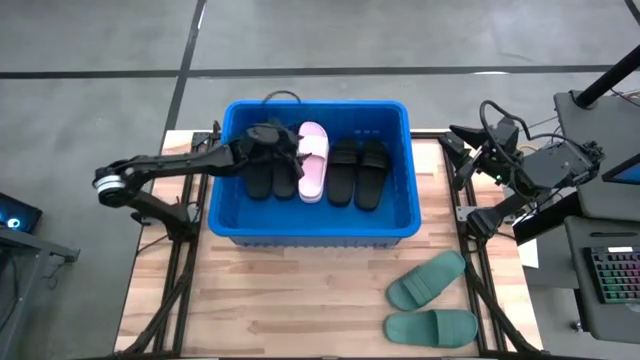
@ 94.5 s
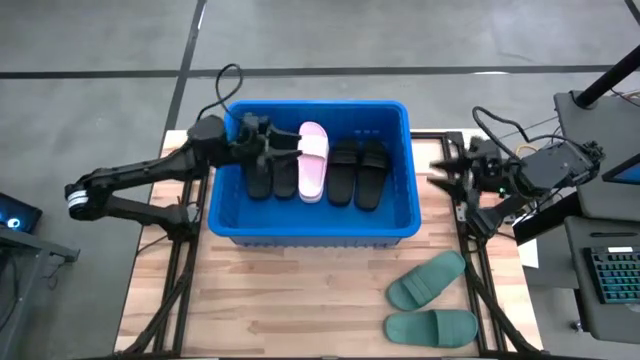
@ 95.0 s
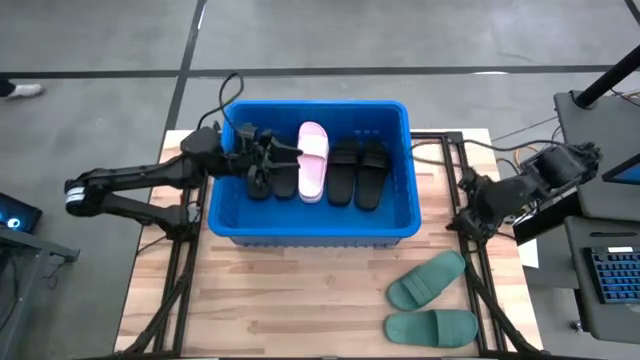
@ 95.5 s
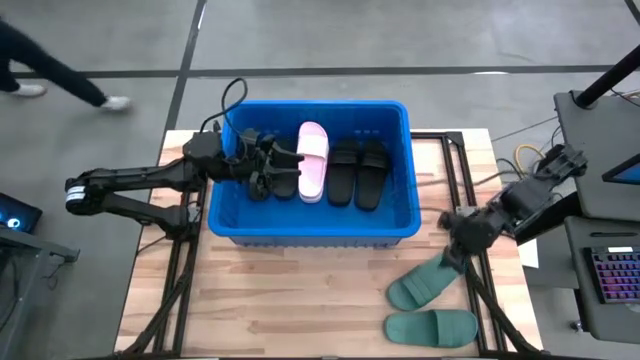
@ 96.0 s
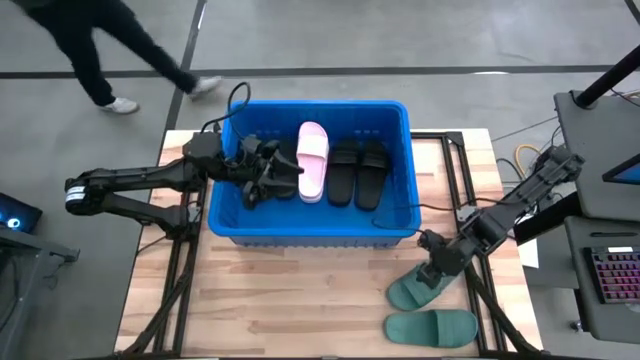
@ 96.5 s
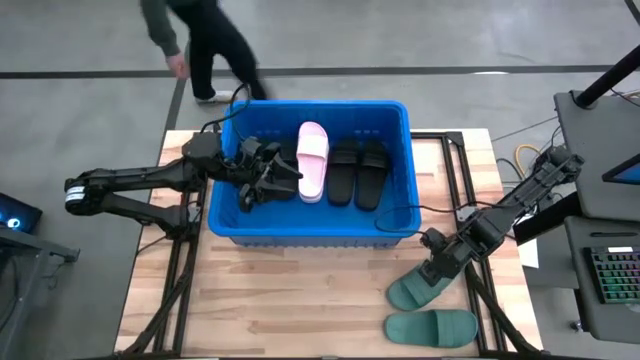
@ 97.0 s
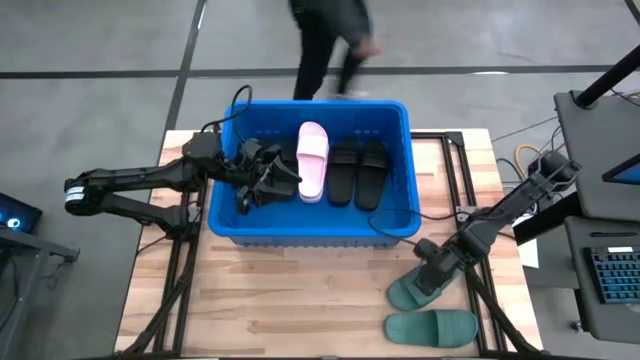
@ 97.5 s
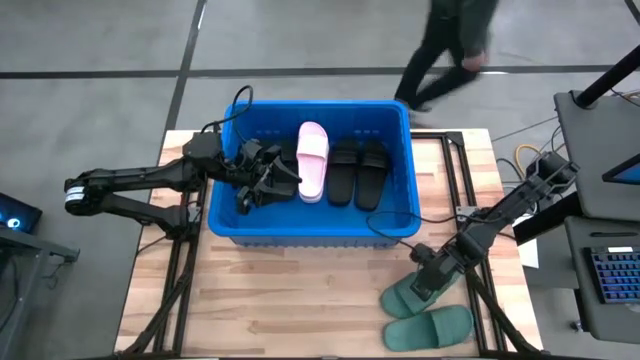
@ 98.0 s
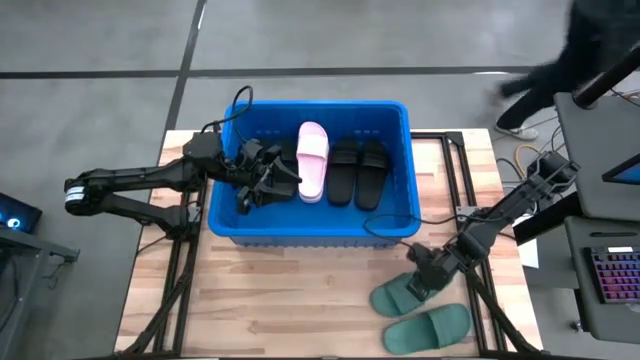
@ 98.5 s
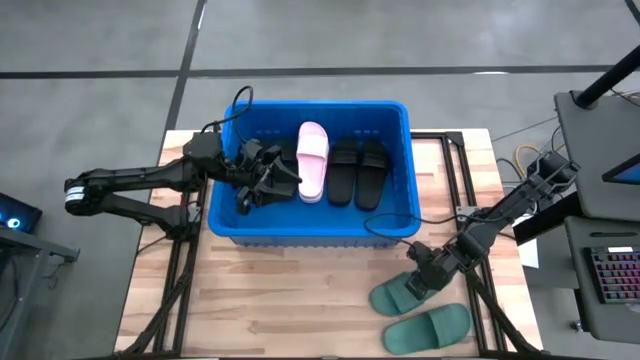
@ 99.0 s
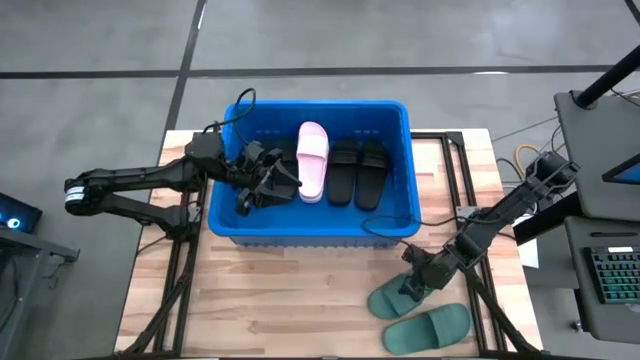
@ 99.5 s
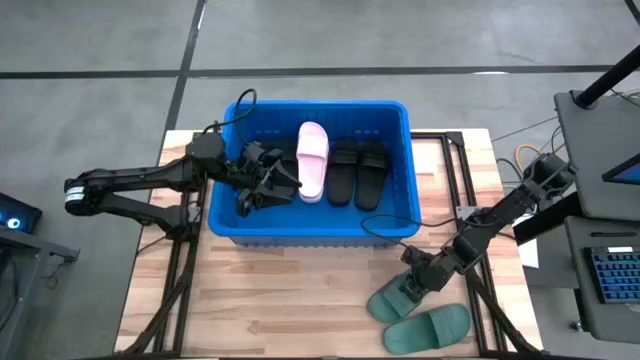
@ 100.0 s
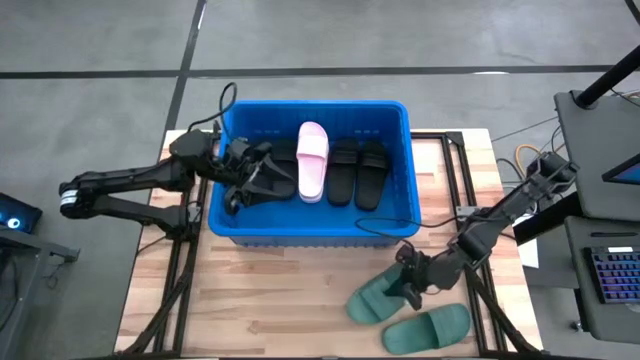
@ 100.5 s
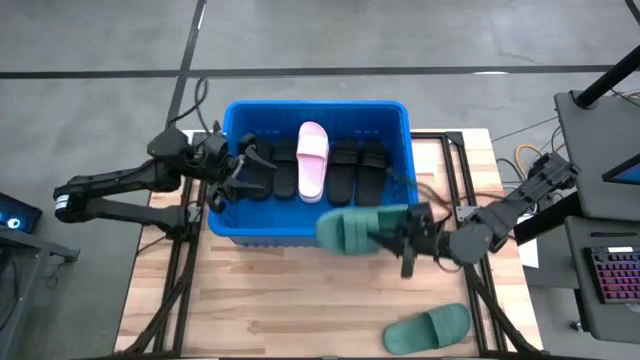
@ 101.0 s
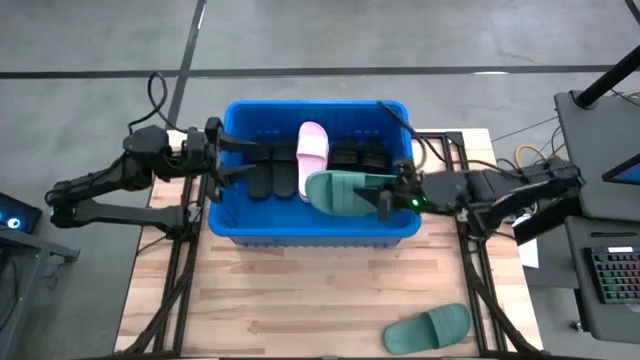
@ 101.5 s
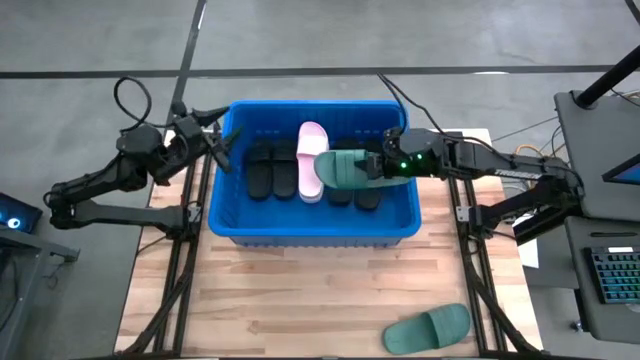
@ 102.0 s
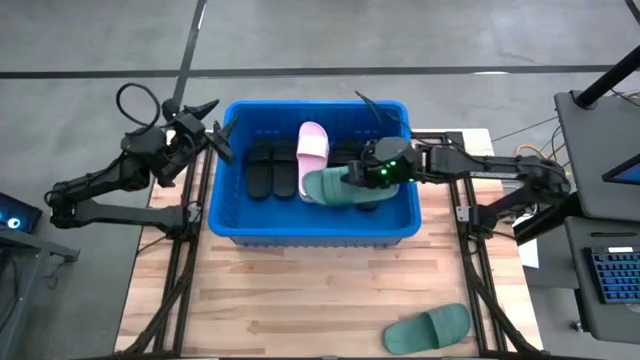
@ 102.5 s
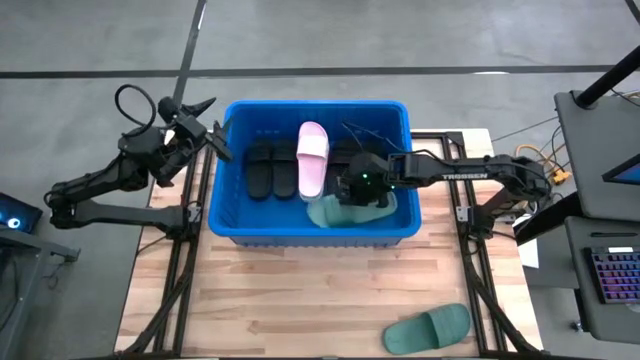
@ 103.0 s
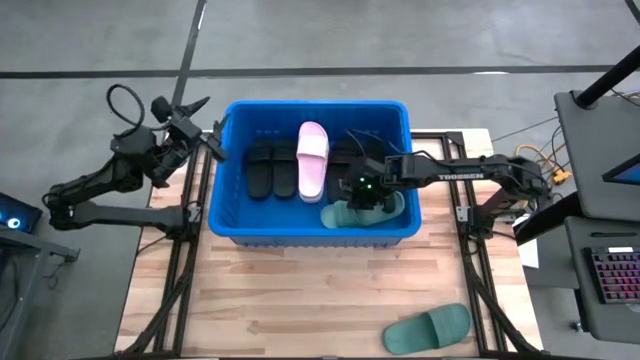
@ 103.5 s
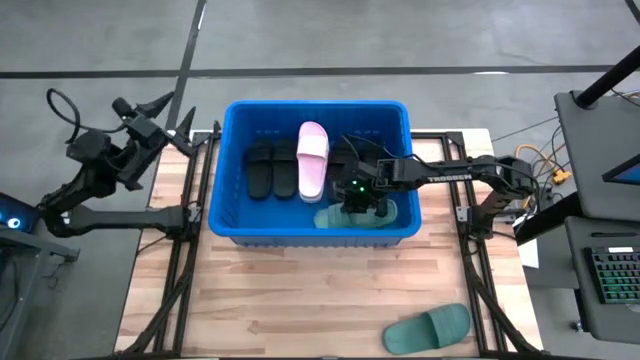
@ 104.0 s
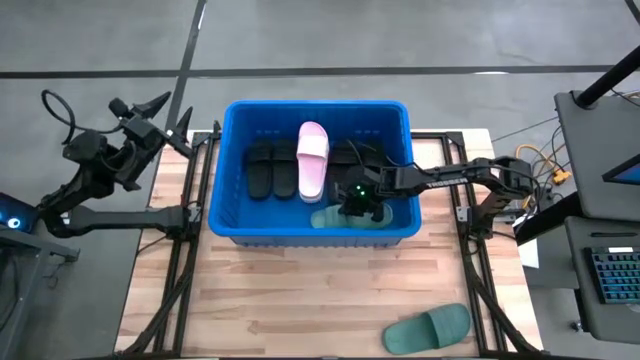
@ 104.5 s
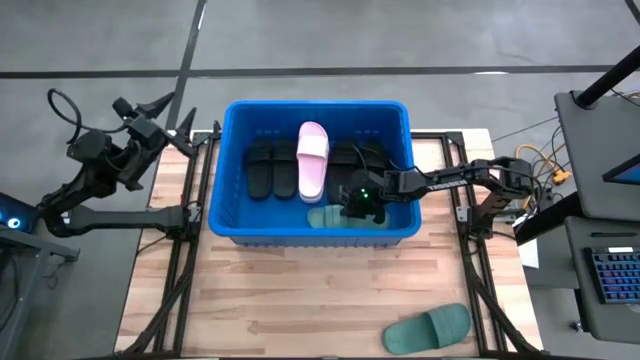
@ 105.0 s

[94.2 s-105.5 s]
Task: Pick and place slides into bin
Put the top green slide into the blue bin

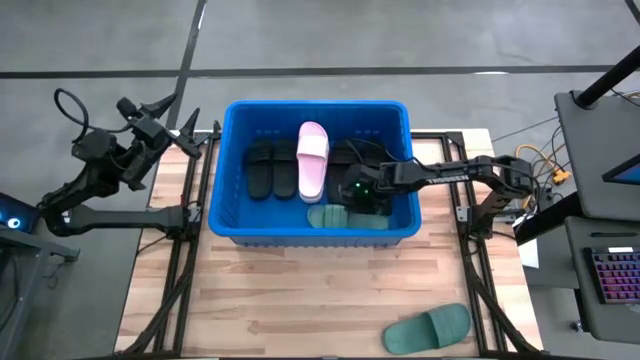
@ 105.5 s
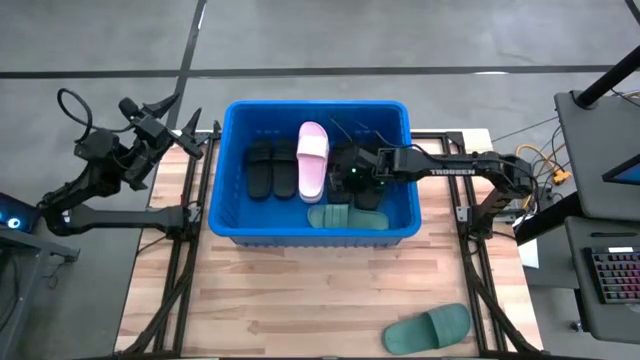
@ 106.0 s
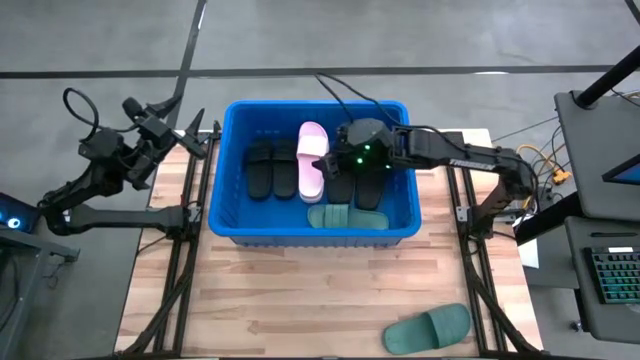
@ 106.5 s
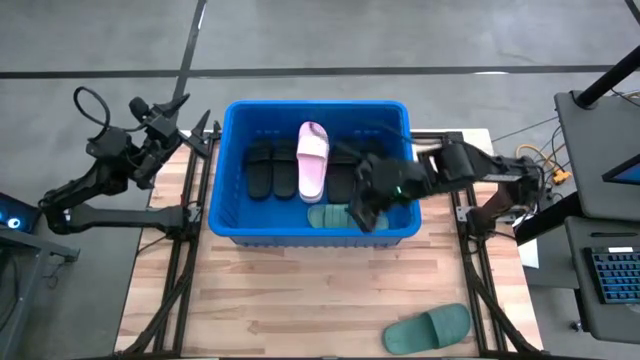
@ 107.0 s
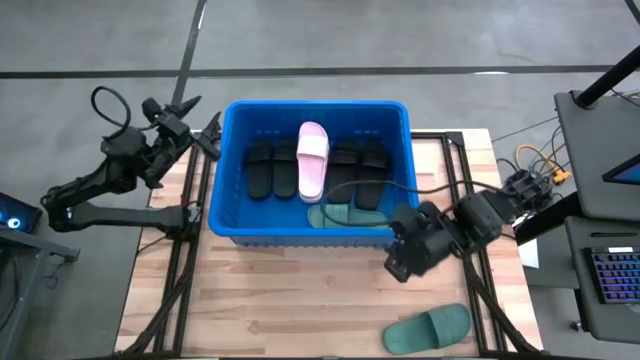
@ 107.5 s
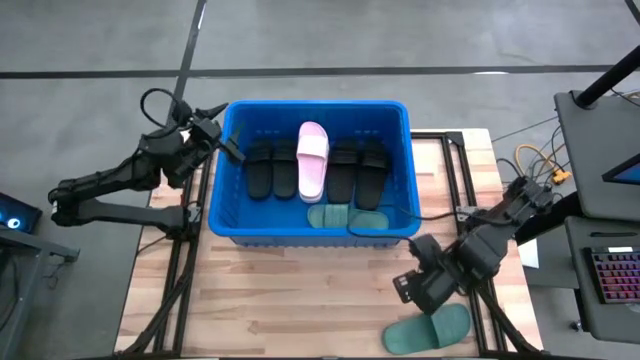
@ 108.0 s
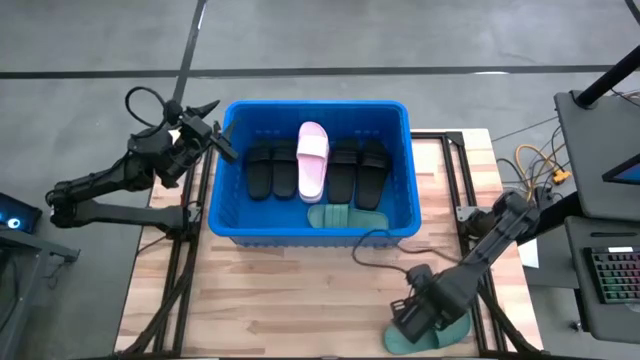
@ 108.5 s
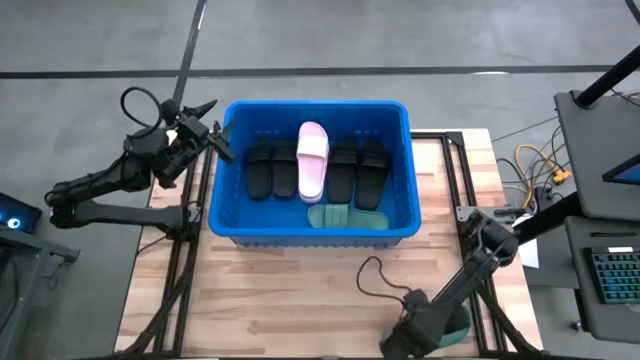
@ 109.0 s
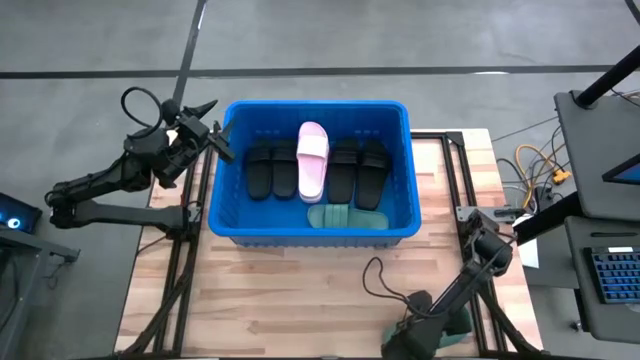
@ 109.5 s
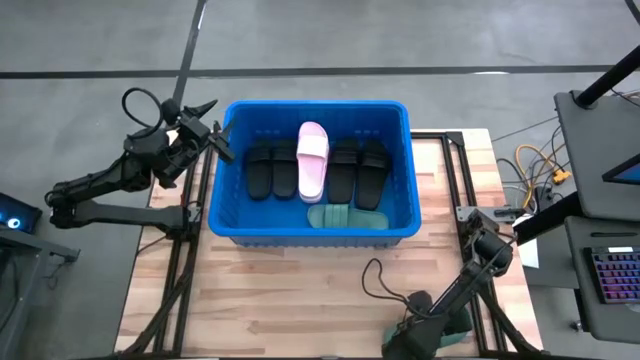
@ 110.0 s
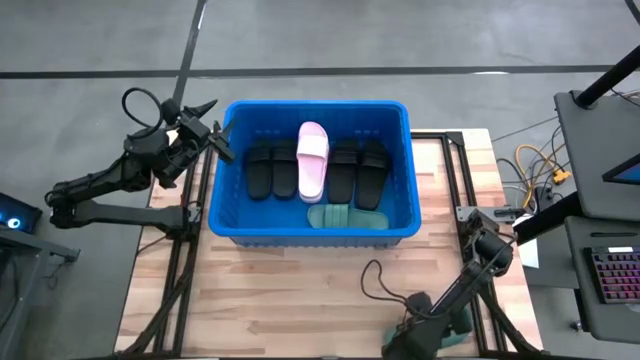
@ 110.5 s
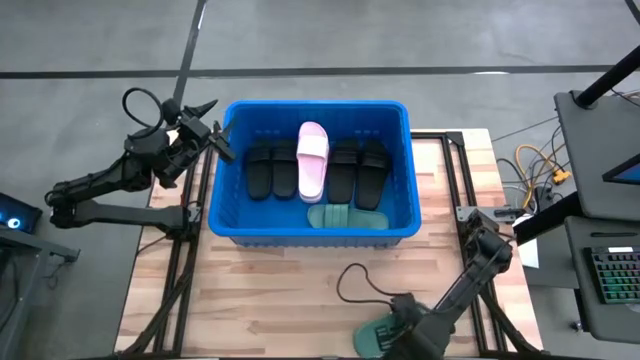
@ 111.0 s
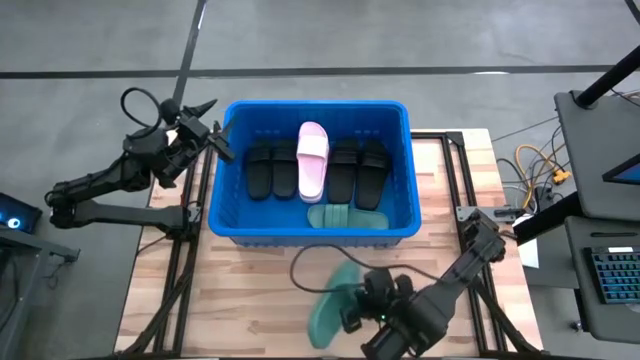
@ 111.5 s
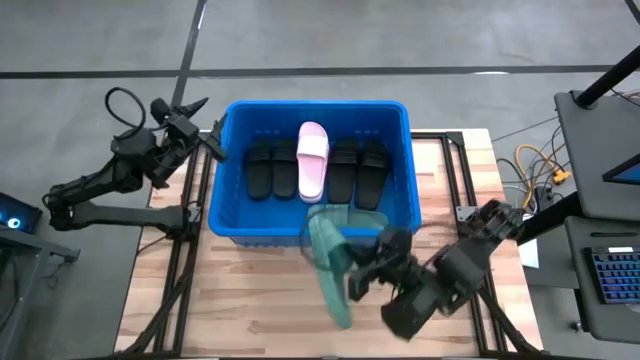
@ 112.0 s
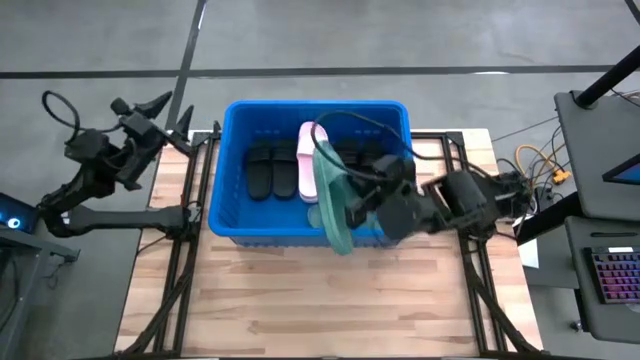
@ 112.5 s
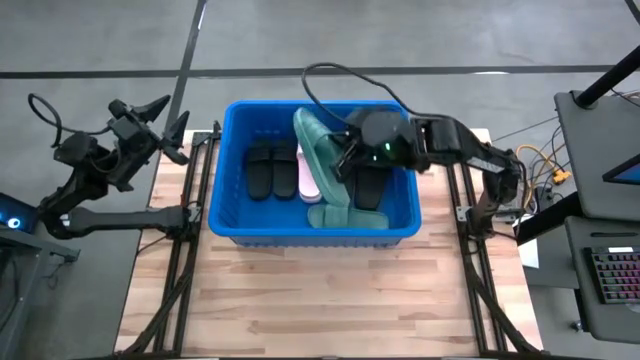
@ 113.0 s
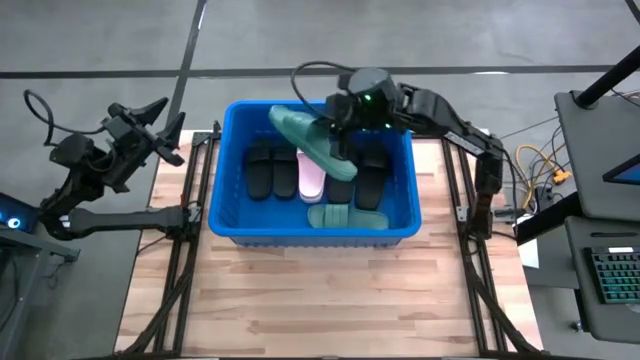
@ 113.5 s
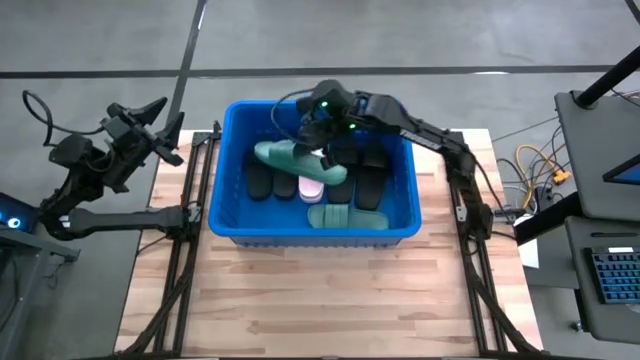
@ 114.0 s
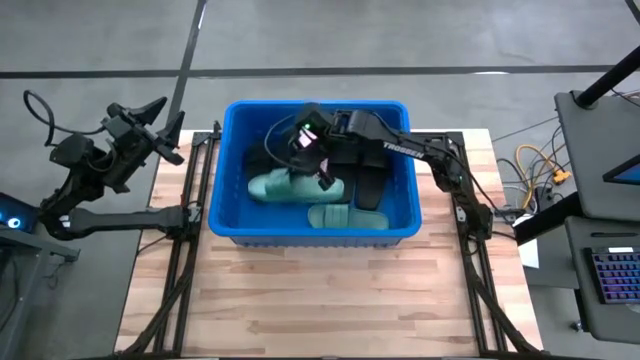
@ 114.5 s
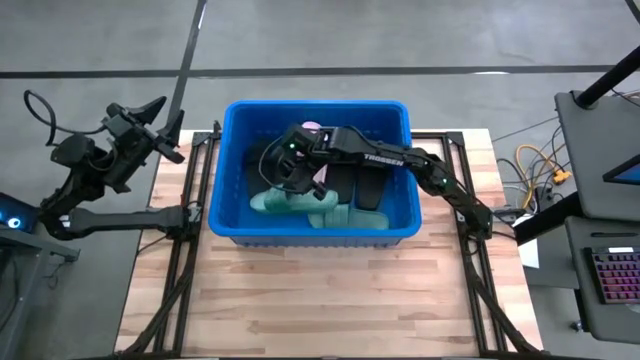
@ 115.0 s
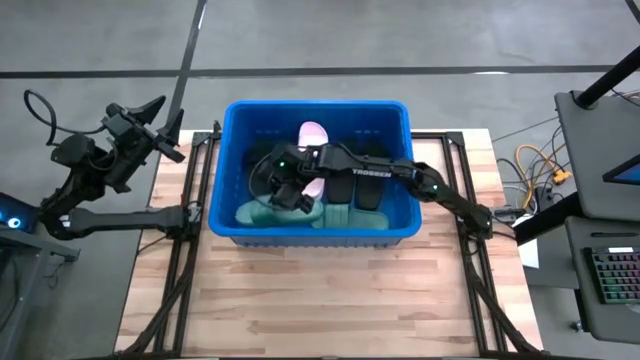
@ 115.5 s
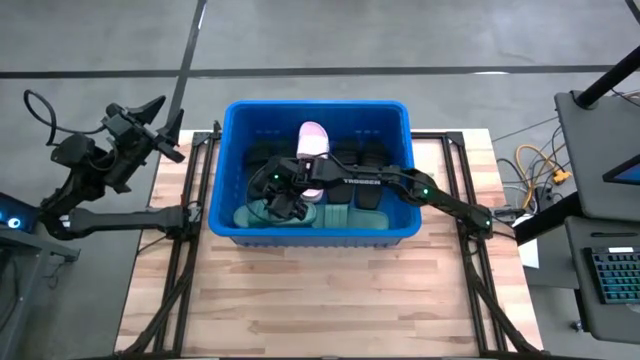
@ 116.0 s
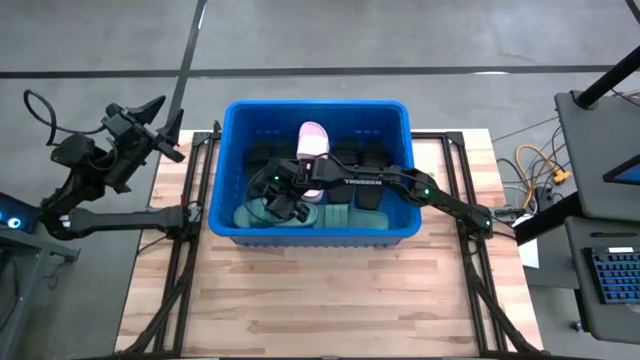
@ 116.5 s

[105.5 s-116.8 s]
Put the green slide into the blue bin
